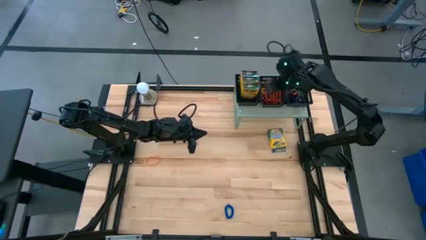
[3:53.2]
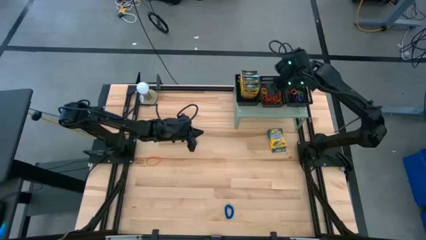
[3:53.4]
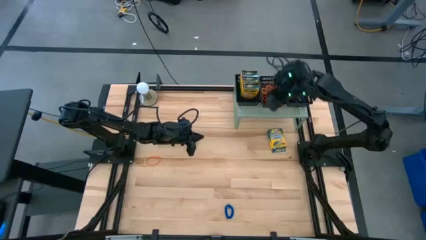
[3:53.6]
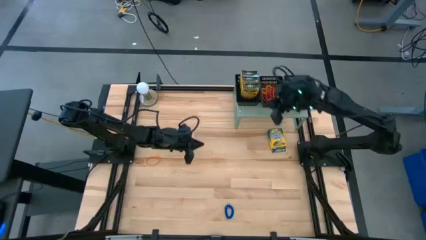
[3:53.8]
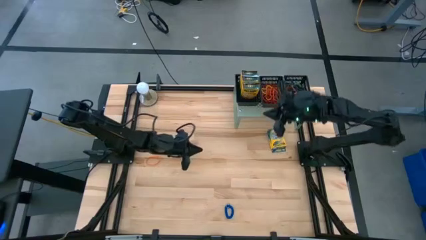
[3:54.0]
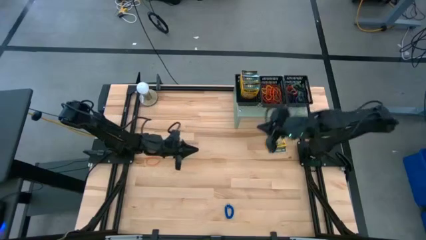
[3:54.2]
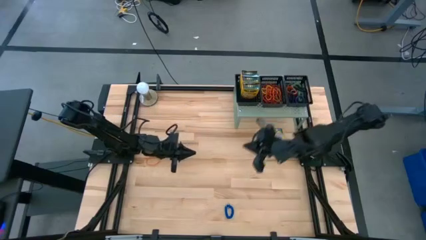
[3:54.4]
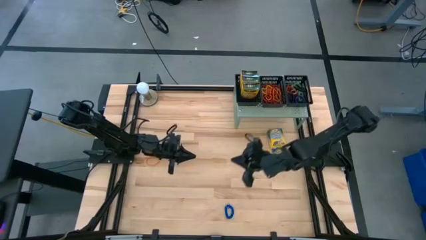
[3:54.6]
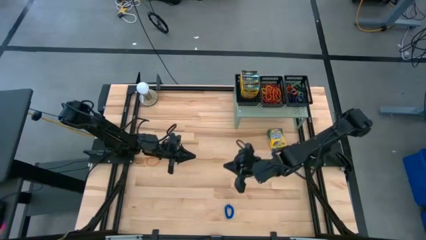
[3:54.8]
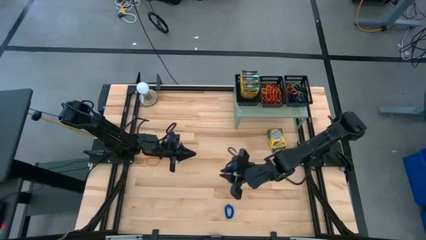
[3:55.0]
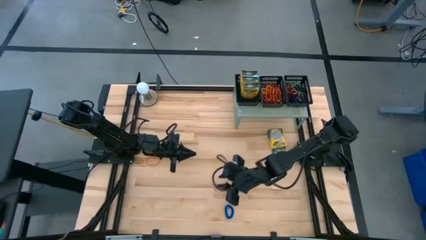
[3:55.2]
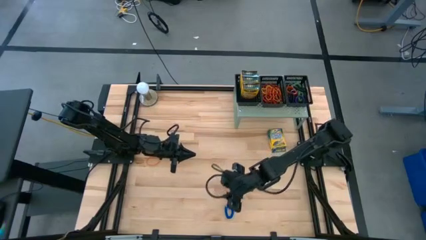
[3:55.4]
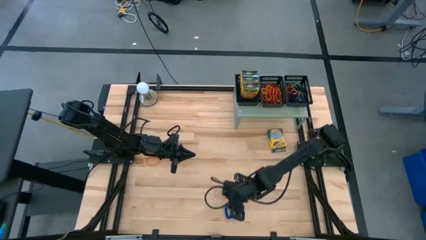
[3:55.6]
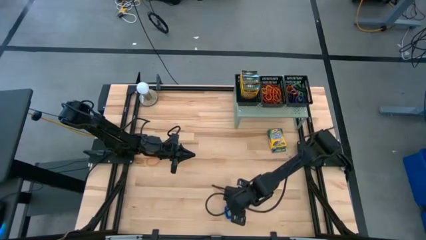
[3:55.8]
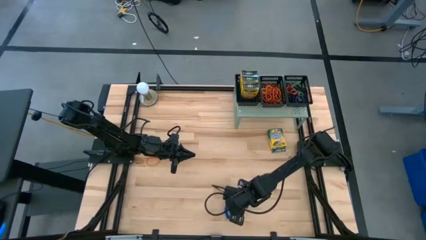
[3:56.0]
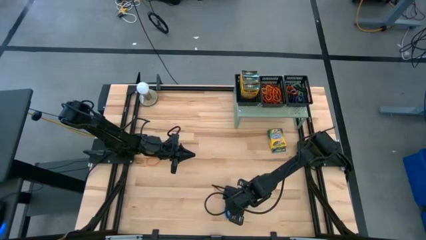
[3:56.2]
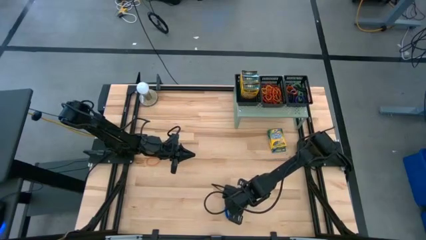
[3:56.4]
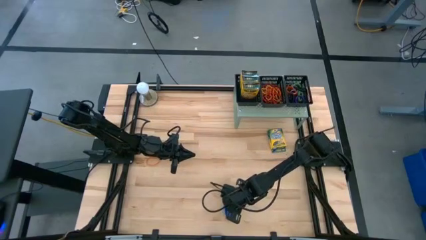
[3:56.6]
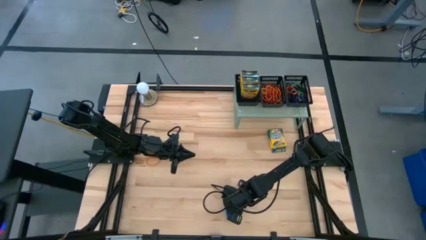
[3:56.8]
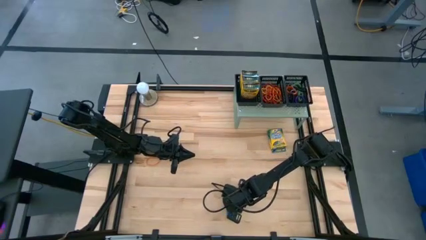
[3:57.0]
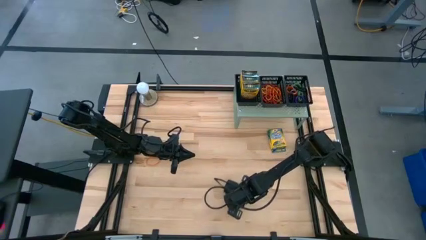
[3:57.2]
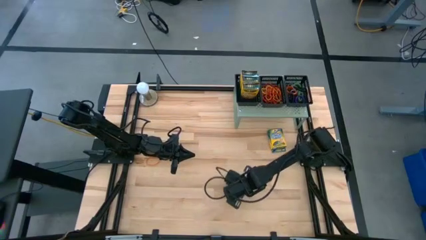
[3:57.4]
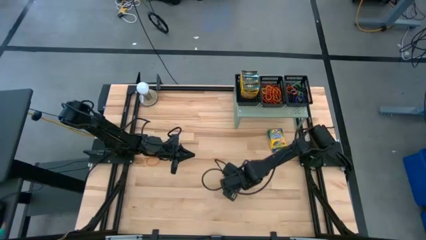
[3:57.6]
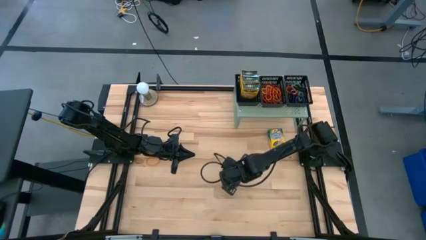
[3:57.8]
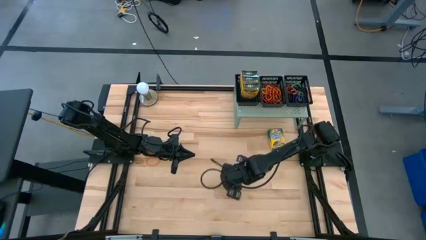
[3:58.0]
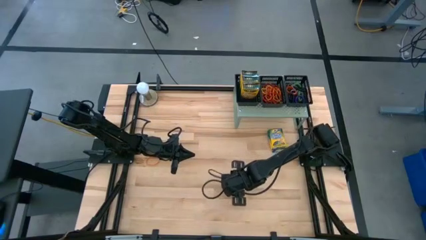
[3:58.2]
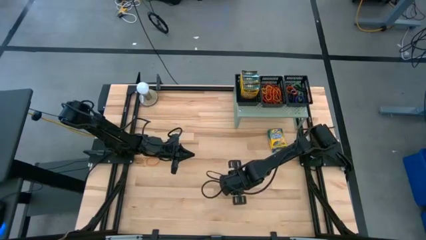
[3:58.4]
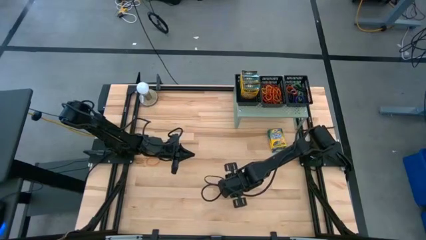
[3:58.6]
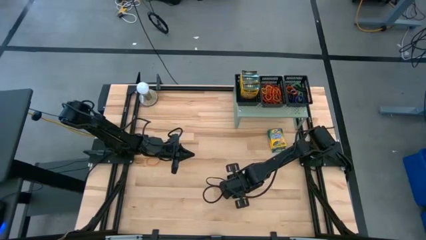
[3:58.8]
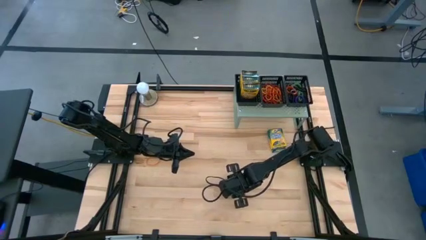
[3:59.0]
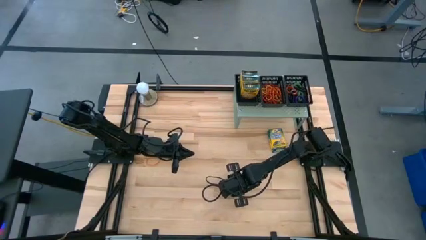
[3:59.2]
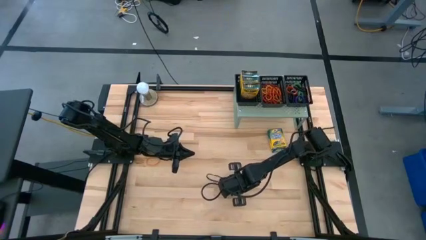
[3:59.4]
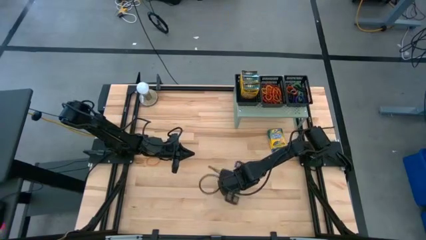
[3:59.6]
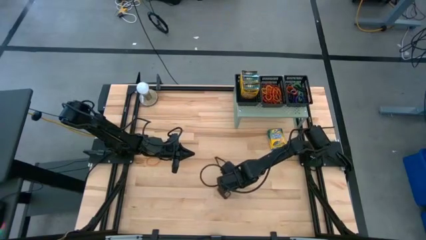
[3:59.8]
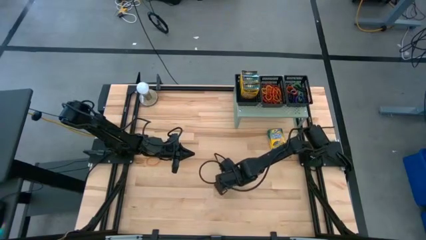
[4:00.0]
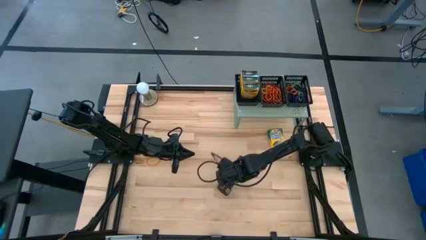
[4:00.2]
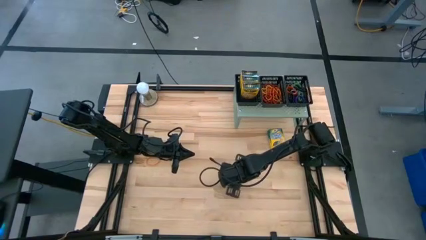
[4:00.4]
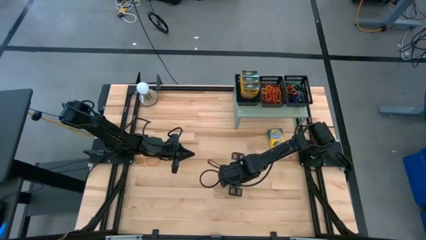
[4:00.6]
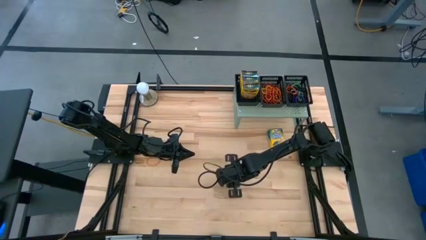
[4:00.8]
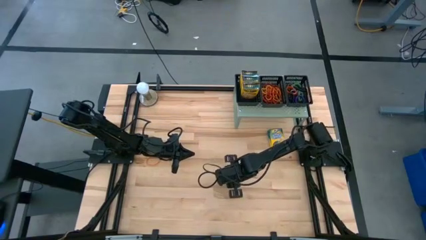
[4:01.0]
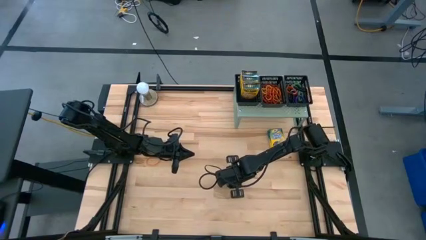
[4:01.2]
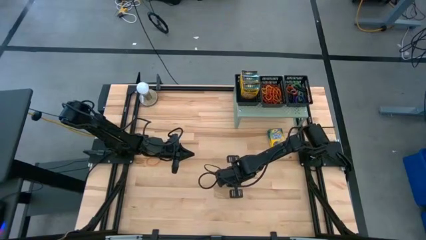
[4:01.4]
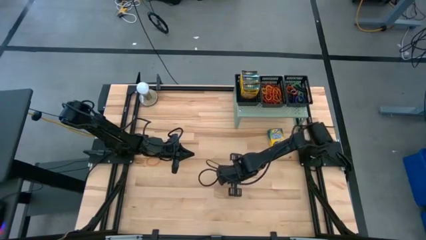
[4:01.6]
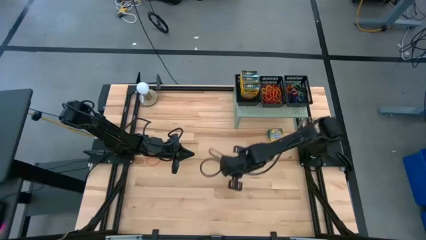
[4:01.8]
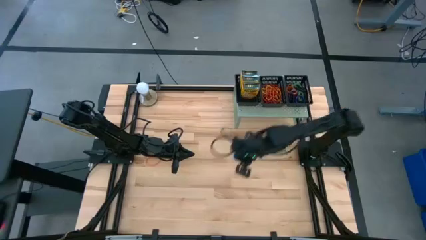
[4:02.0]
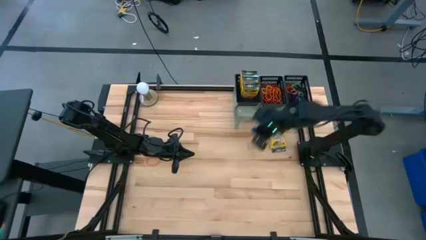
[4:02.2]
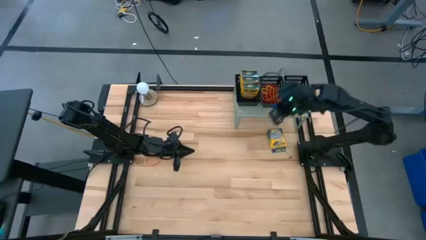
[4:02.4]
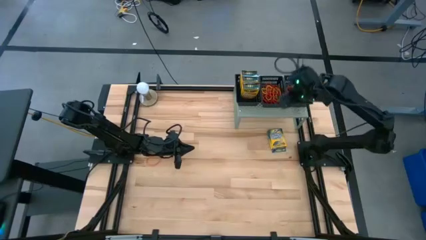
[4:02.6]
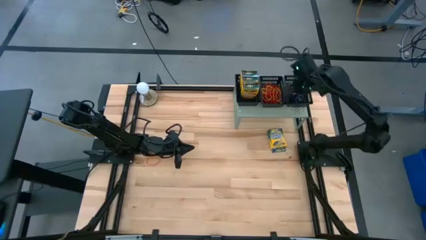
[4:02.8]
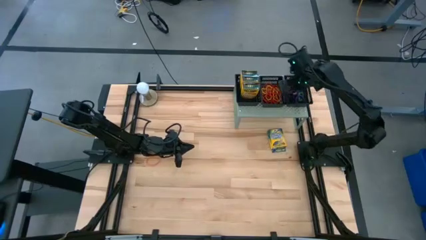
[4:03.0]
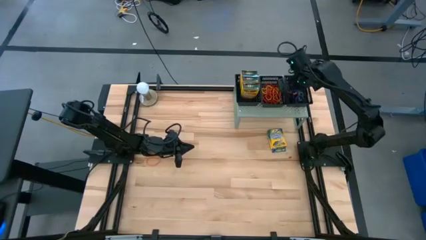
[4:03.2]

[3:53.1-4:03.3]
Task: Pick & Place Office Desk Supplies
Put the blue spring keychain into the right black basket on the shelf

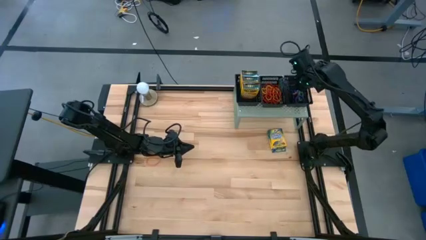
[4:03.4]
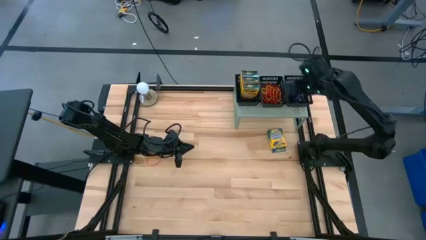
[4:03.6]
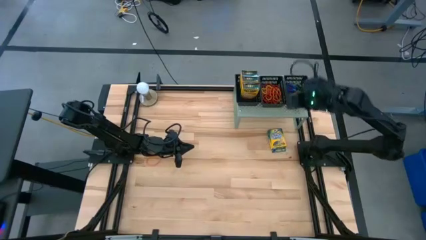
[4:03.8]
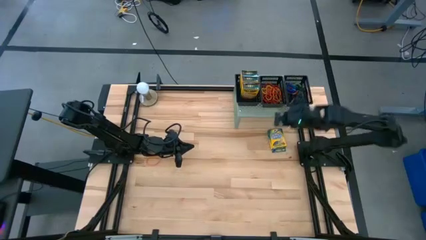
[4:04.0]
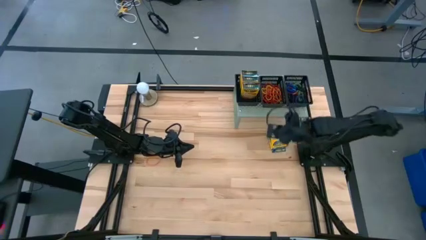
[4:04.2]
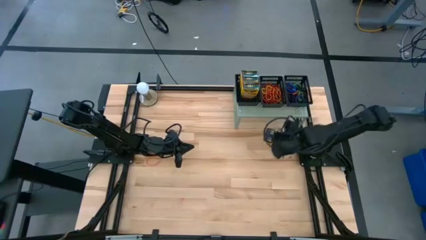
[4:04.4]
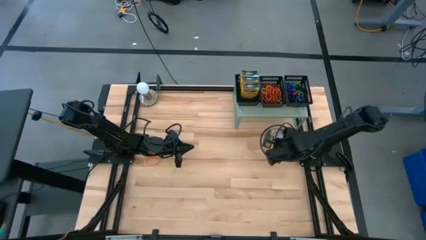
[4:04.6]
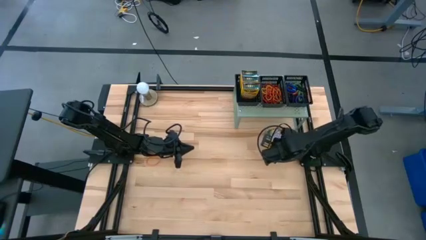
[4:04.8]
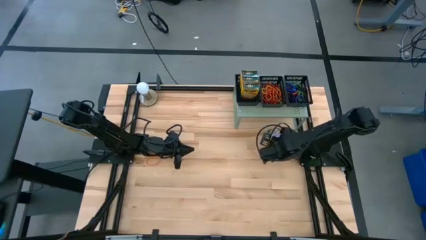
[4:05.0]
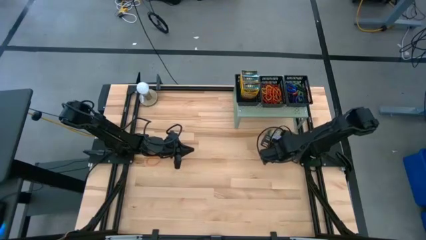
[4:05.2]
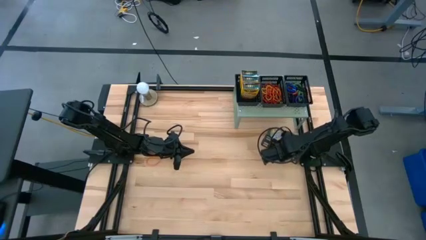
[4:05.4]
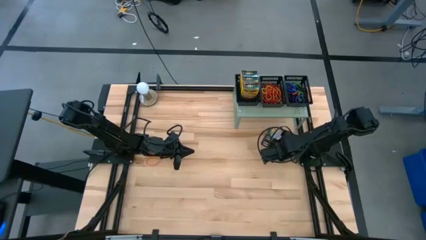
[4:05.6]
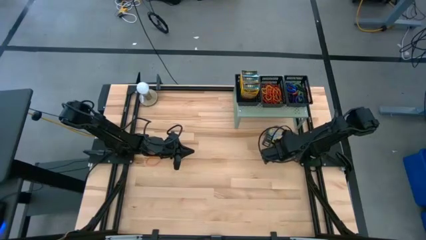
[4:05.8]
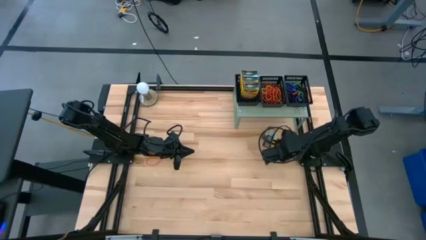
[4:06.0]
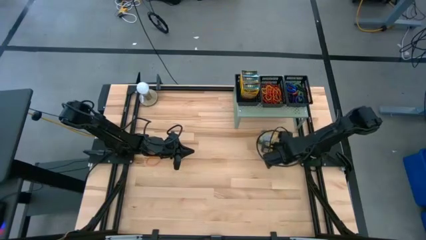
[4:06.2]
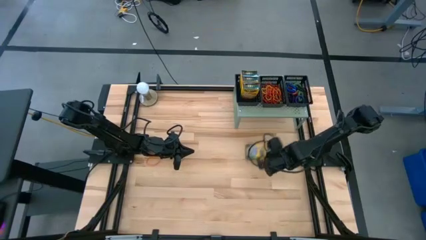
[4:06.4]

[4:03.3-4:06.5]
Put the yellow crayon box into the left black basket on the shelf

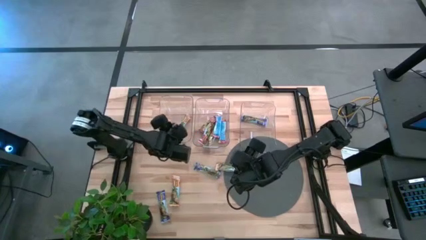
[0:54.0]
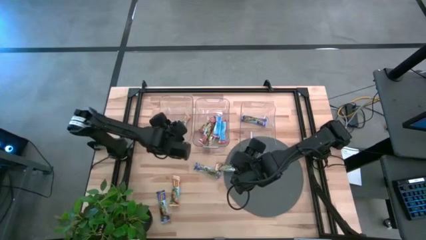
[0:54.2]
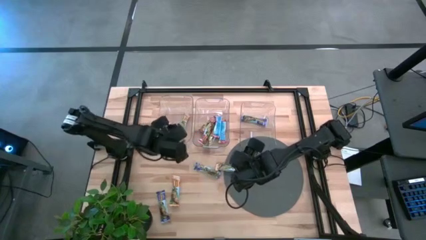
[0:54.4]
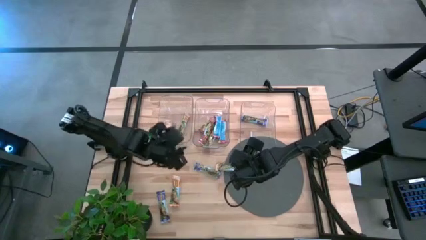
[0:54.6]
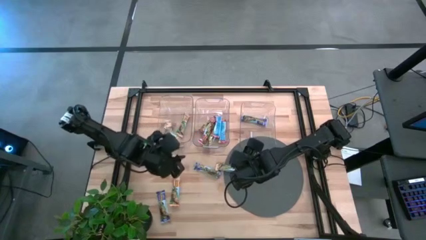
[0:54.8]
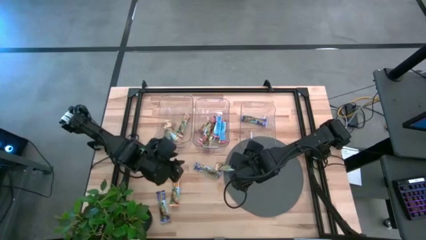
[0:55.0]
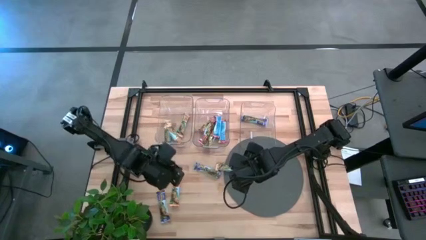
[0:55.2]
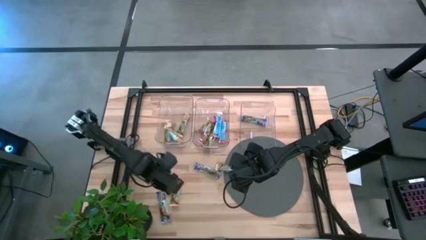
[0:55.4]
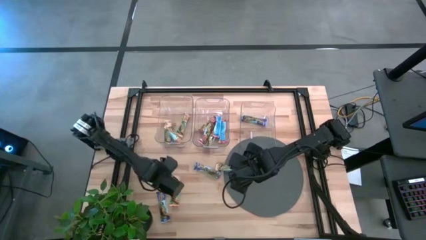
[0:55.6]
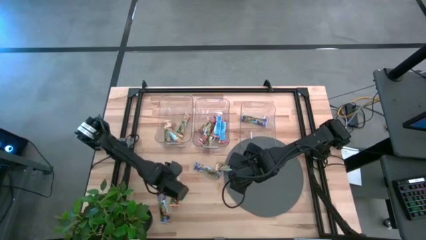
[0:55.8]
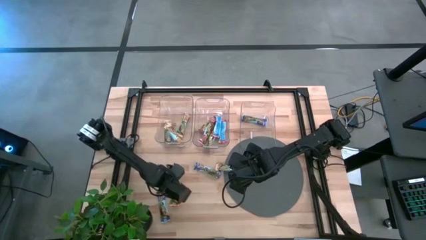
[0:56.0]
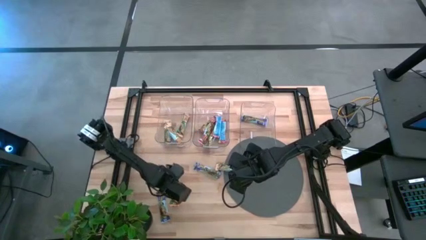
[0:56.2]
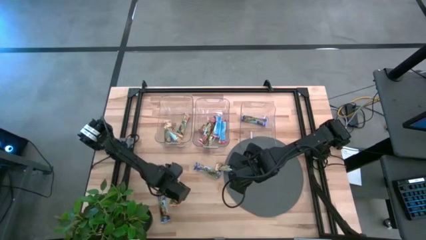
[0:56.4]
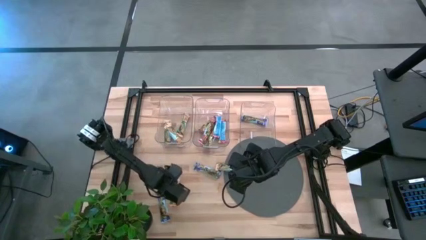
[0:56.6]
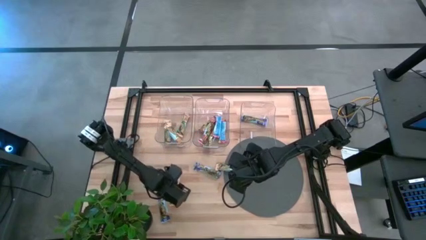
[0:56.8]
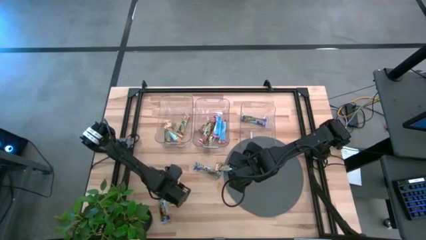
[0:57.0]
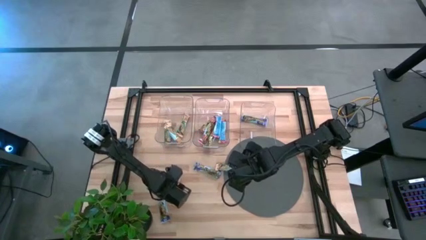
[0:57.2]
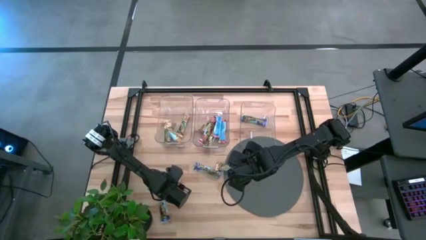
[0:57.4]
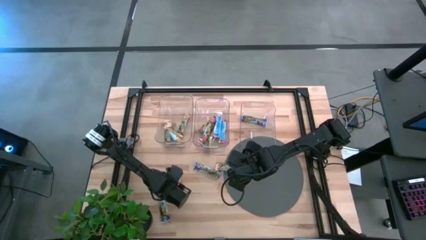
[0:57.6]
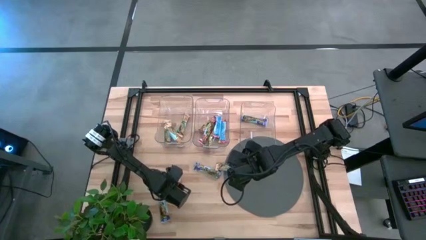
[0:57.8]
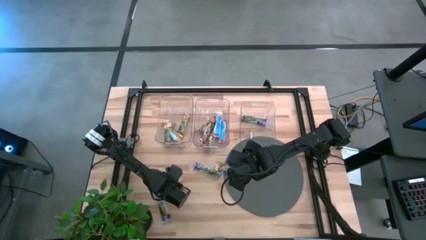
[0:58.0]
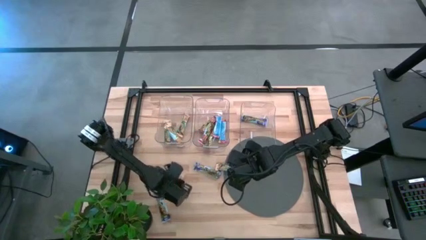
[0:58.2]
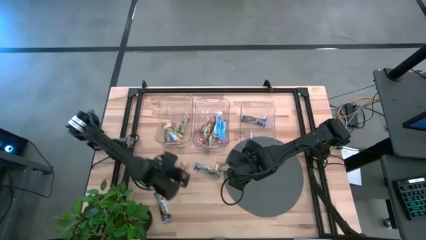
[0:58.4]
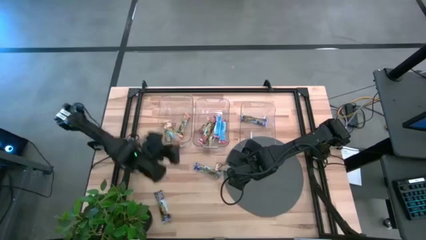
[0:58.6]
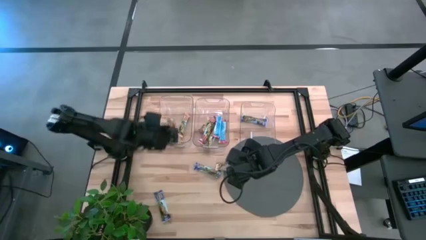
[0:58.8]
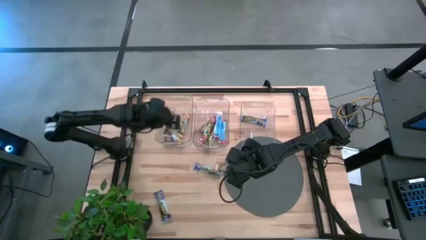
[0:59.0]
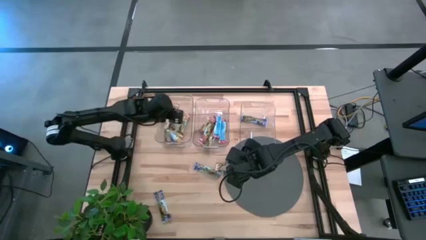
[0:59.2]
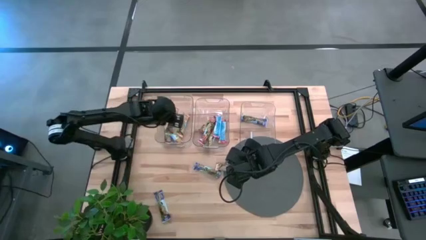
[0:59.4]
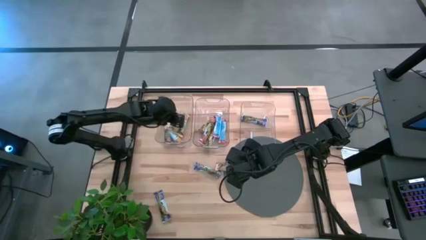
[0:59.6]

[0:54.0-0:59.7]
Task: Pick and place Granola Bars by type
Put the yellow granola bar into the left transparent bin
